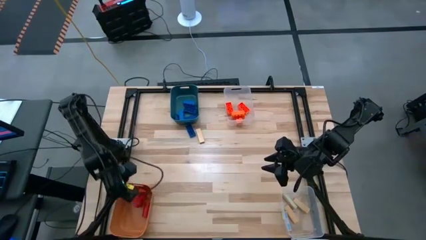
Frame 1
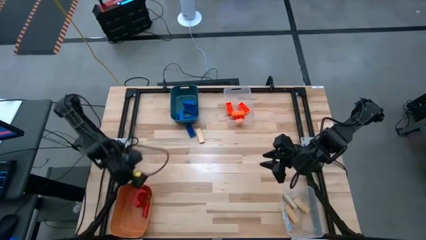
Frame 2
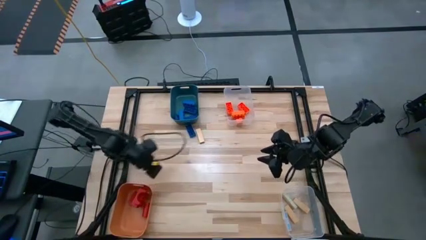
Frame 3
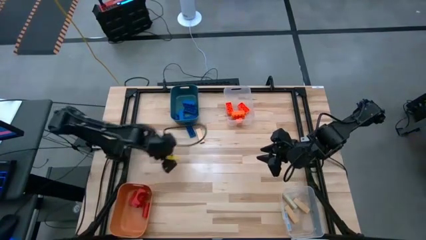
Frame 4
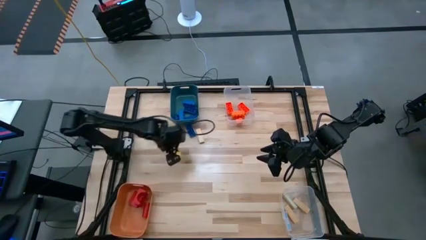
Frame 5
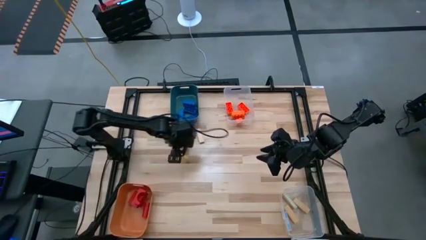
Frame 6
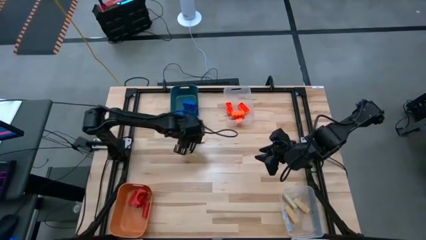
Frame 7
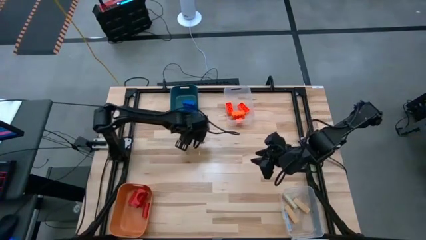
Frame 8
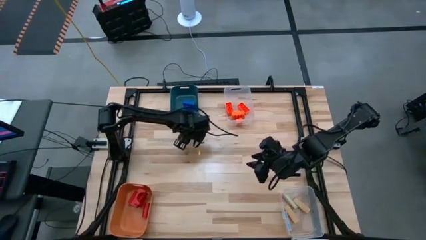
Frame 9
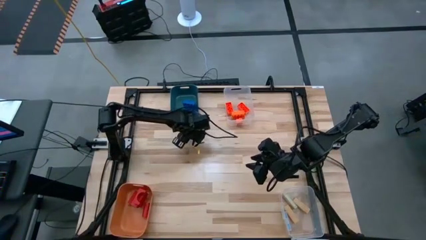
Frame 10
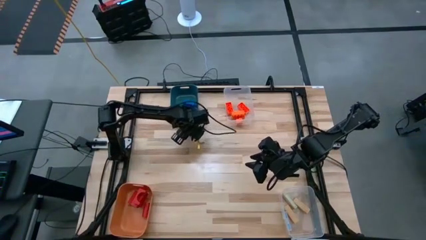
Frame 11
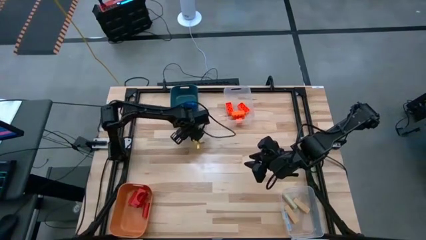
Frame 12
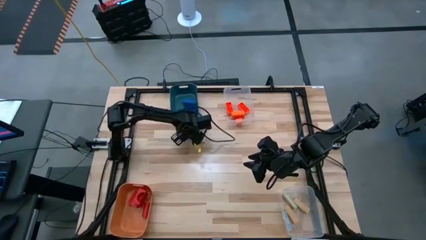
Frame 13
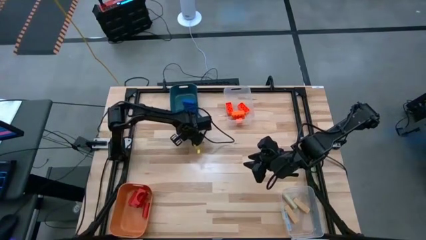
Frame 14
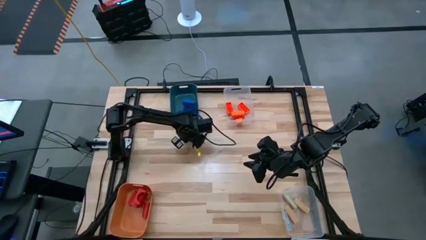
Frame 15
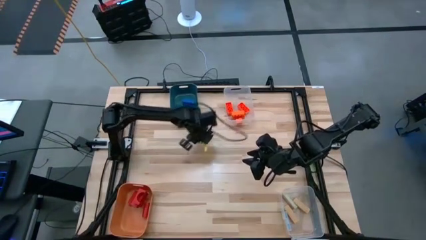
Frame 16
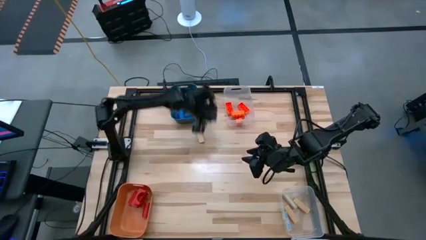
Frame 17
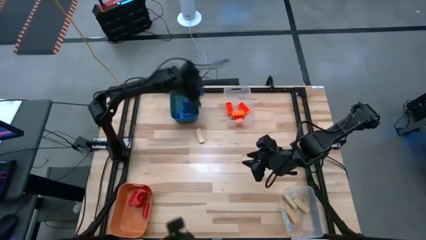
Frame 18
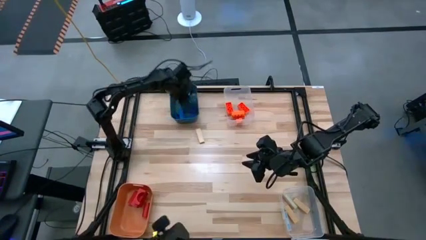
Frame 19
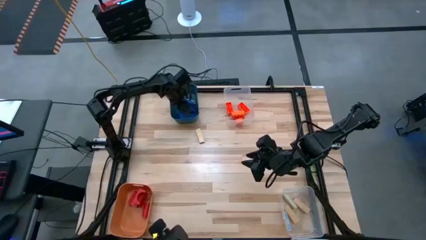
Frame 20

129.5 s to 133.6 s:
Task: Sort blocks
Put the blue game piece into the dark blue bin

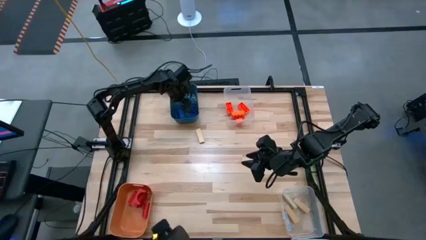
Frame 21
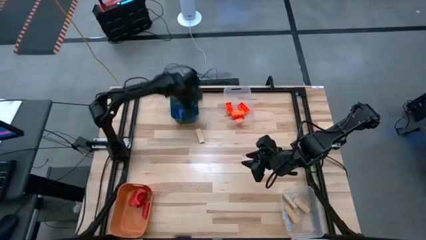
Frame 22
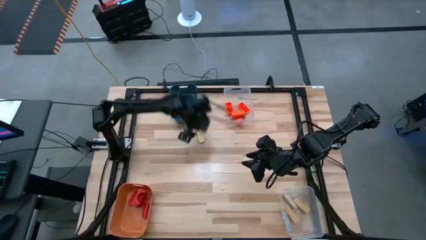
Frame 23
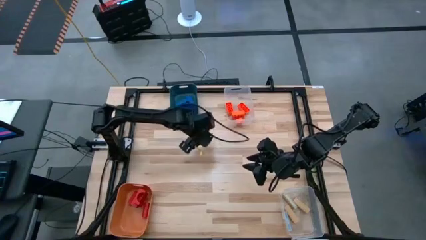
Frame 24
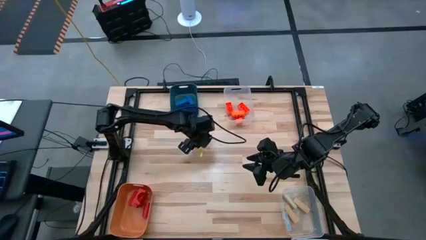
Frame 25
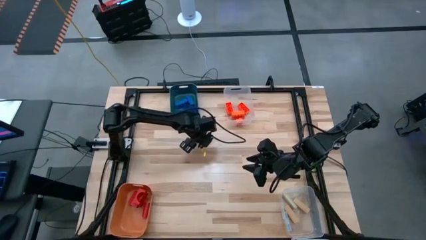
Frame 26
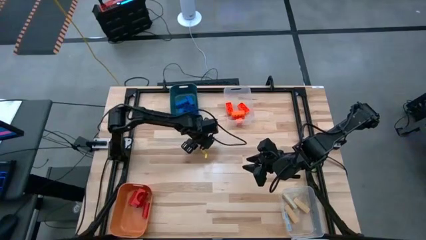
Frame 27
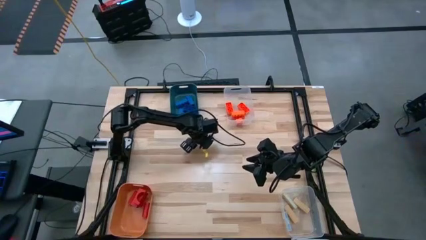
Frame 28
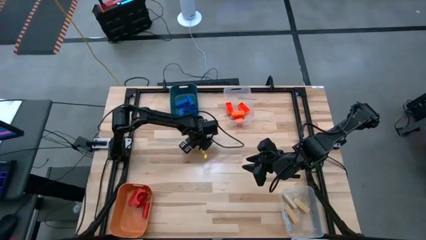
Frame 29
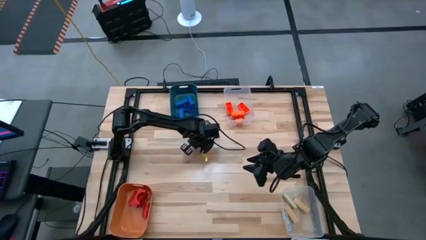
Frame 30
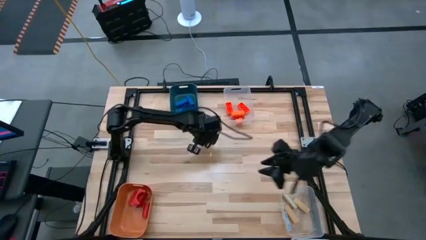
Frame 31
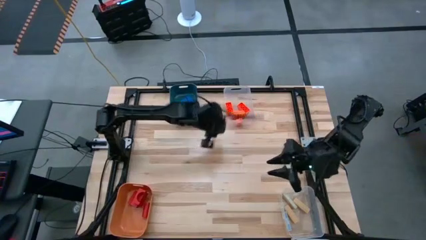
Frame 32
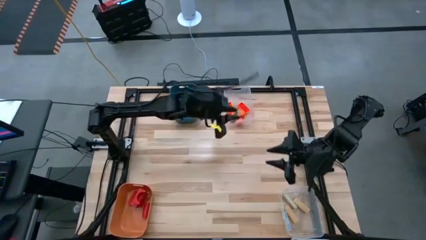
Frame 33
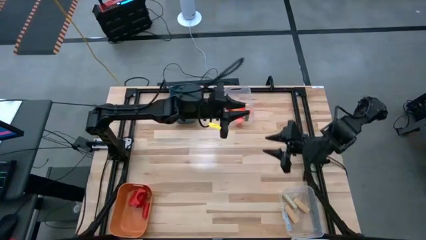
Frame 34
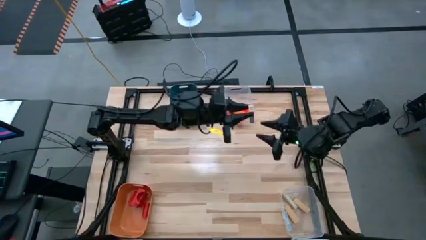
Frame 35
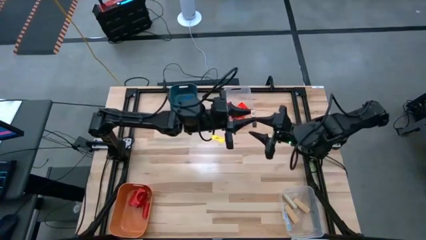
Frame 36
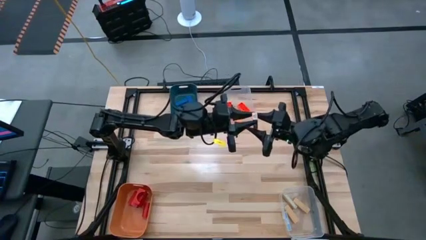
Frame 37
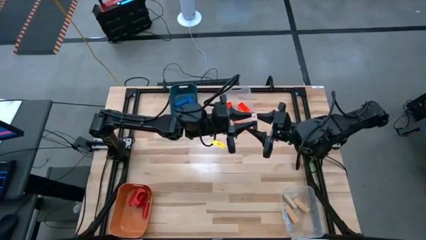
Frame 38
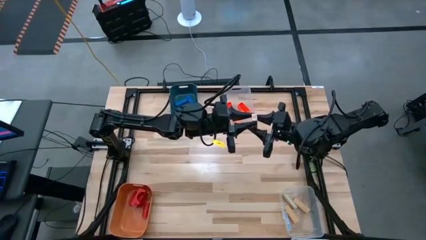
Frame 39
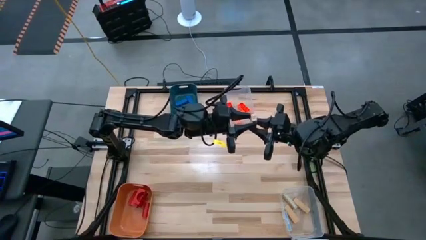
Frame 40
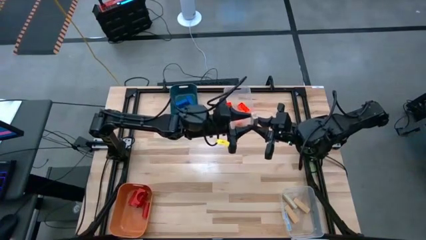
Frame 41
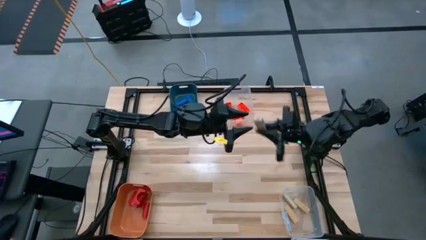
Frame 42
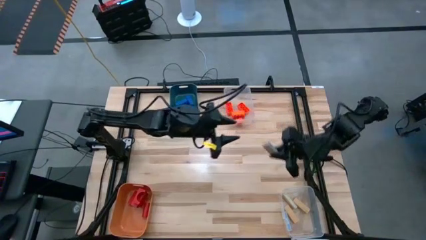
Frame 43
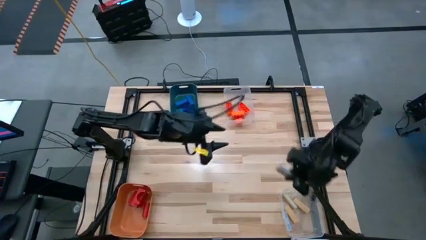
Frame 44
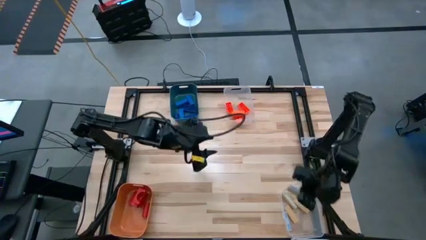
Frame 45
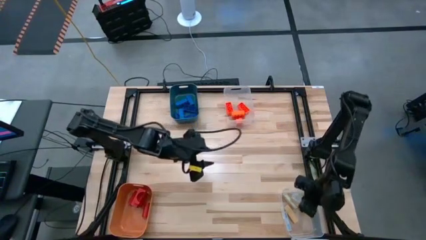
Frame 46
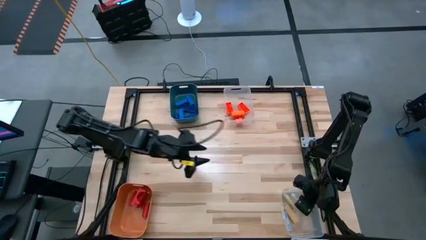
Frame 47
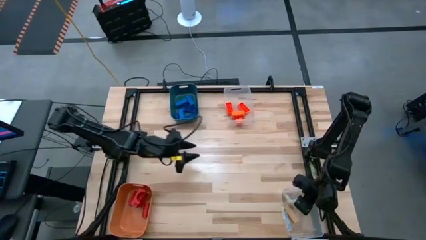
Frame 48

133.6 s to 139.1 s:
Put the brown block into the bottom transparent bin

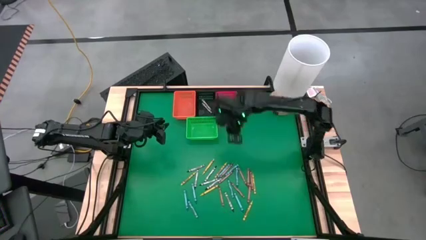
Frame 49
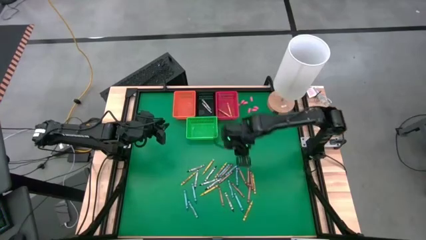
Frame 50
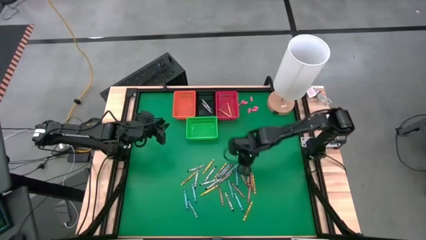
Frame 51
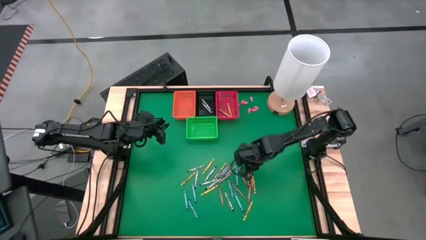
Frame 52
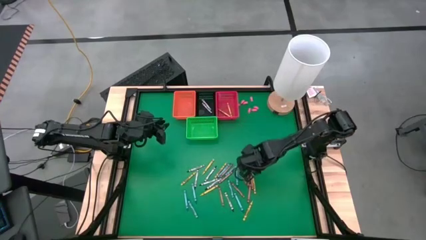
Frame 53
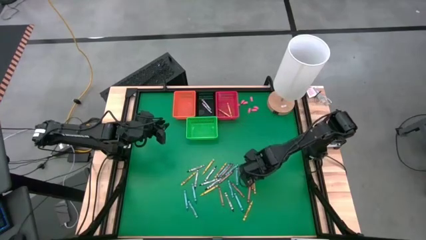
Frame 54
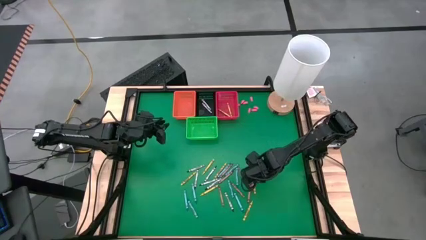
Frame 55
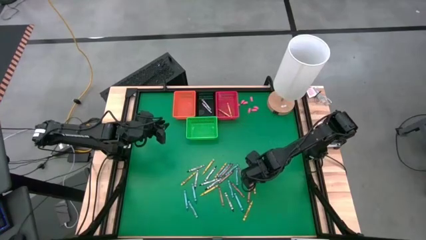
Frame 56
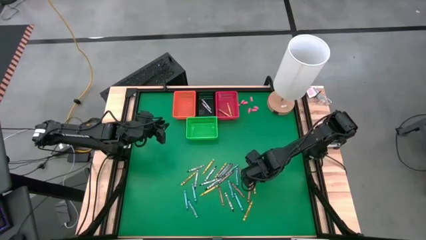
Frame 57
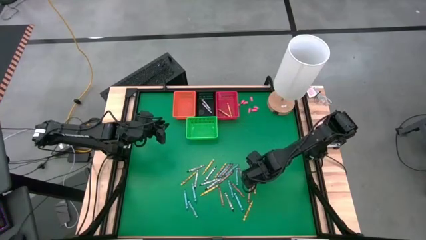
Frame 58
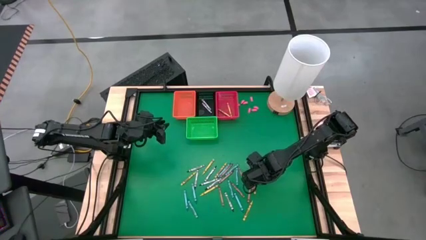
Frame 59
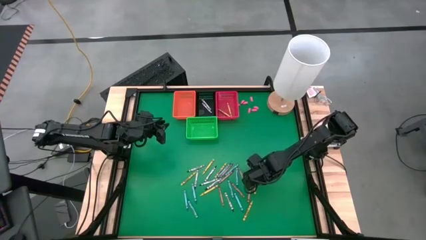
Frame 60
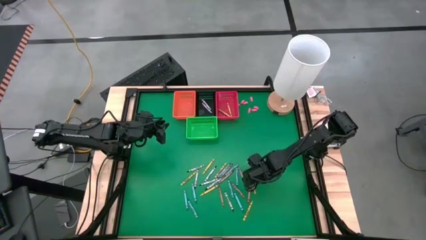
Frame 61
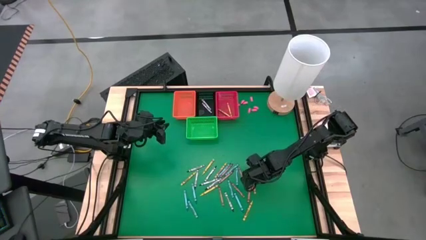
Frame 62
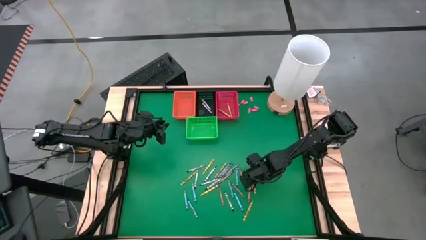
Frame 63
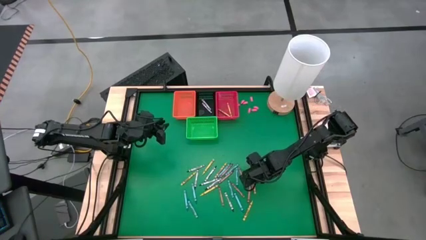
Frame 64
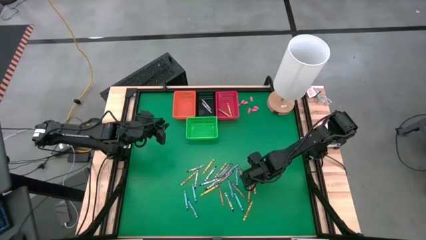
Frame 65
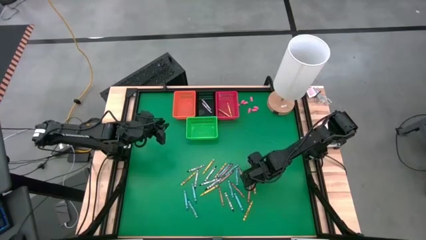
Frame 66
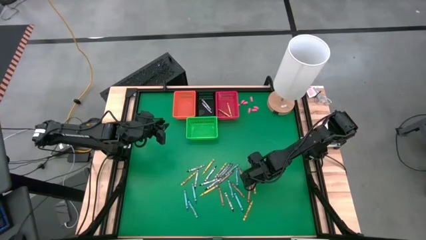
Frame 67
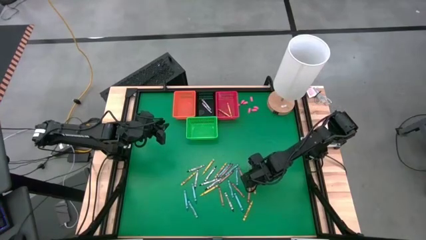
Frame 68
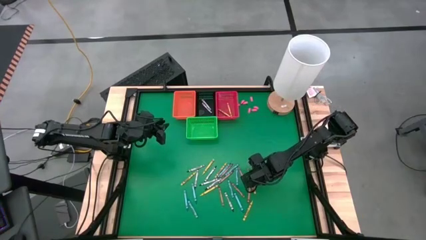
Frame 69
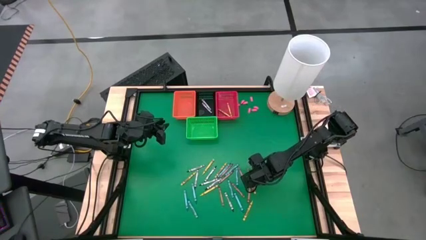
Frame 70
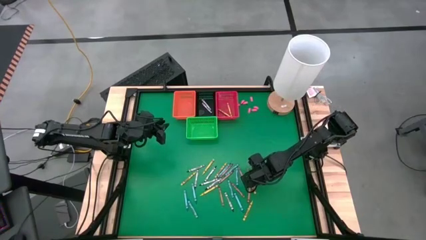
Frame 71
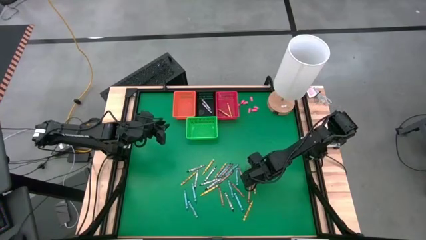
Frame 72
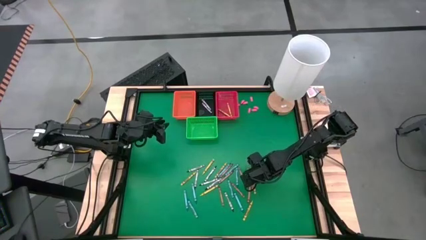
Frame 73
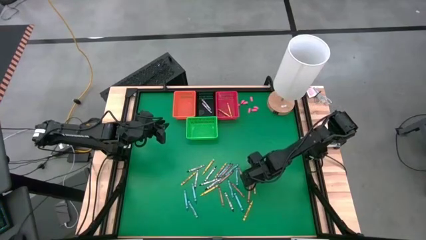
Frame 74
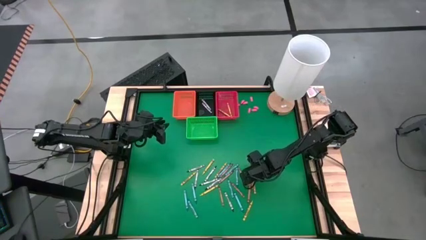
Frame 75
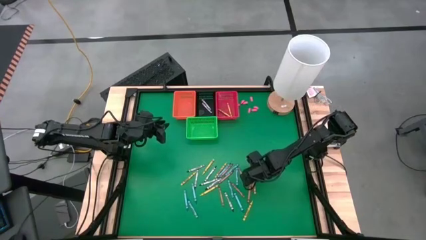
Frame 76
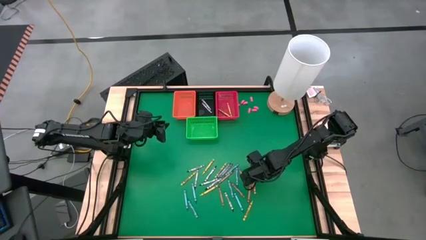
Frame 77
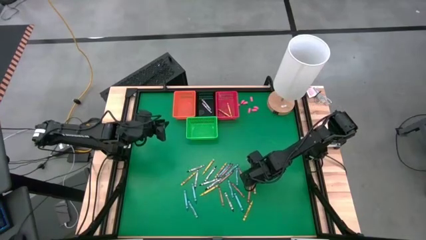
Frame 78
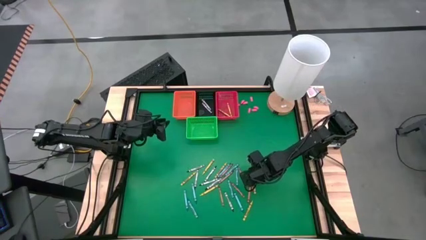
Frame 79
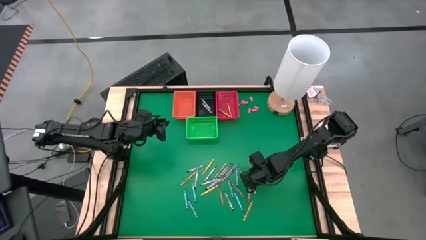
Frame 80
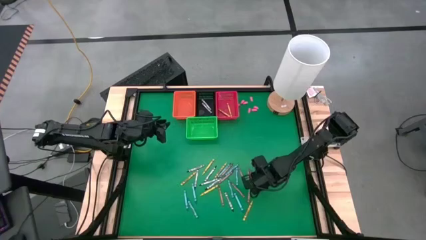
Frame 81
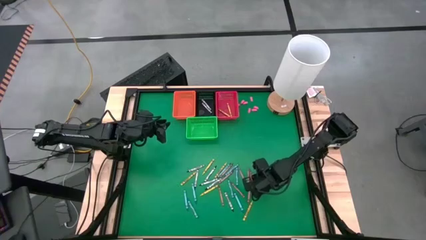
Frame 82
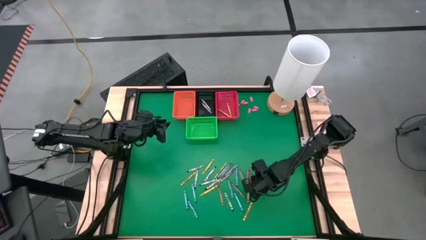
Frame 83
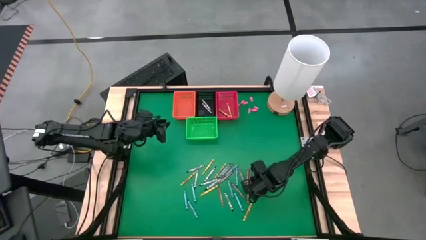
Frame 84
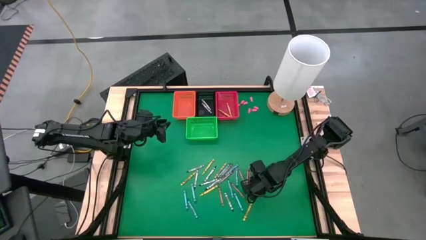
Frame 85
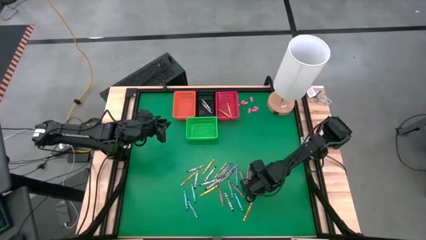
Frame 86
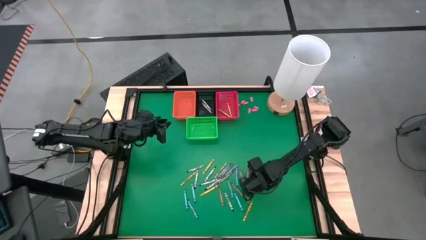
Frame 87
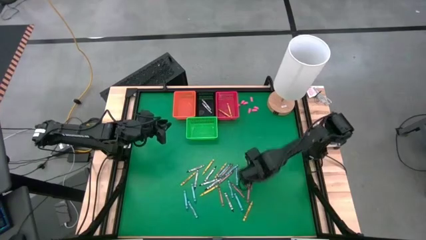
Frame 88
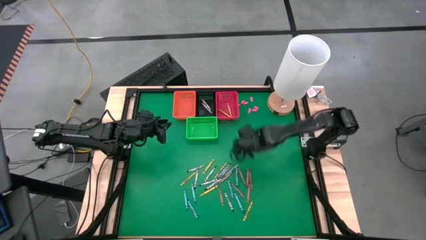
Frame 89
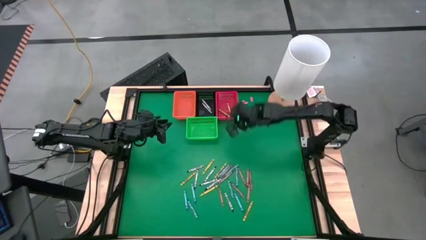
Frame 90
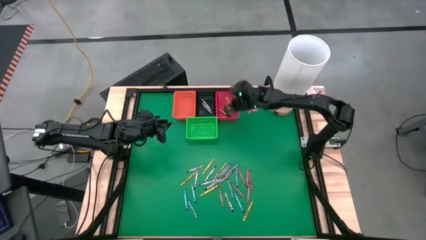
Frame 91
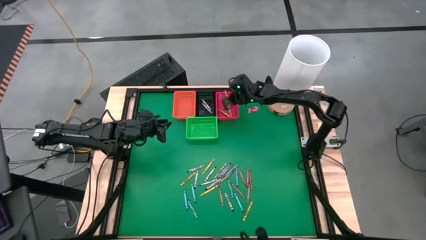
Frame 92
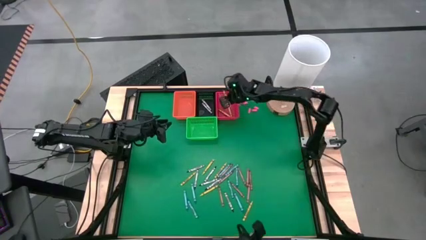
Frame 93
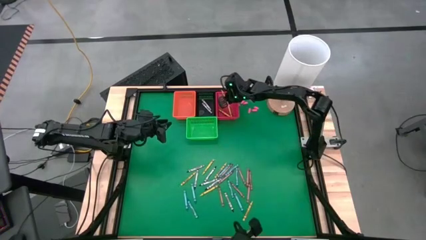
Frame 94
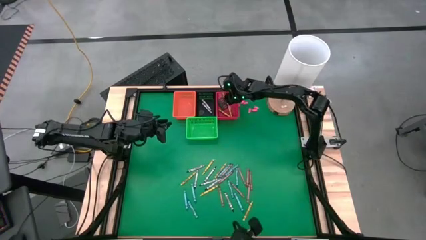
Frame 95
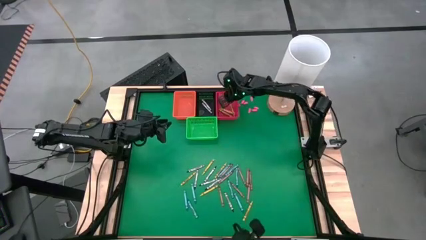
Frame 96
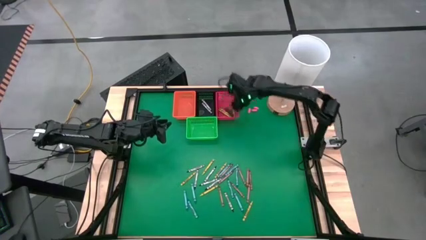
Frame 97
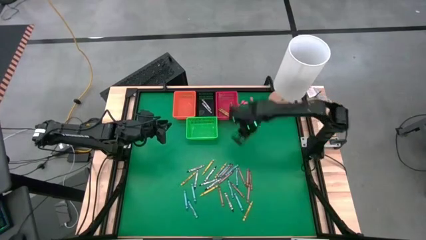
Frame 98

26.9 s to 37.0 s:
Task: Sort crayons
Put a yellow crayon in the red basket
